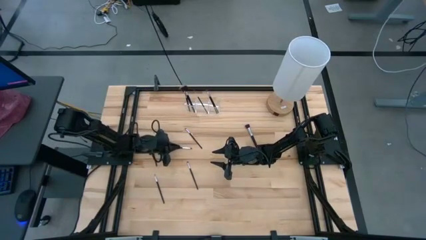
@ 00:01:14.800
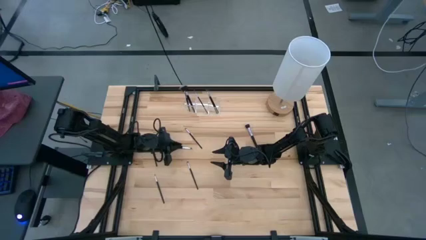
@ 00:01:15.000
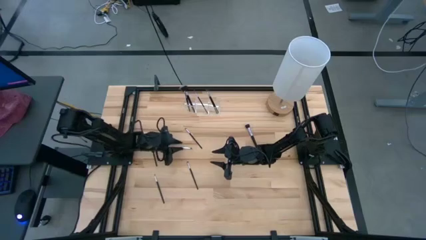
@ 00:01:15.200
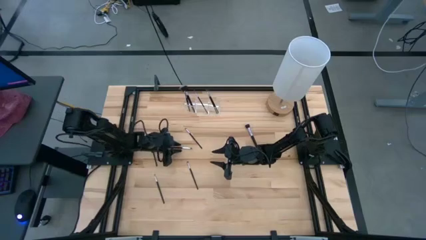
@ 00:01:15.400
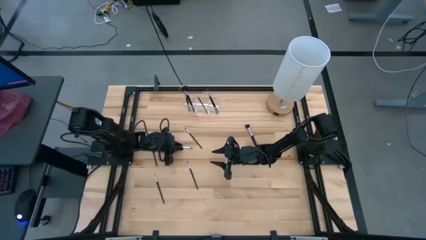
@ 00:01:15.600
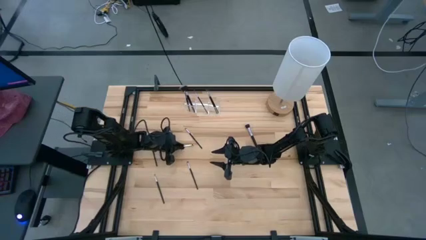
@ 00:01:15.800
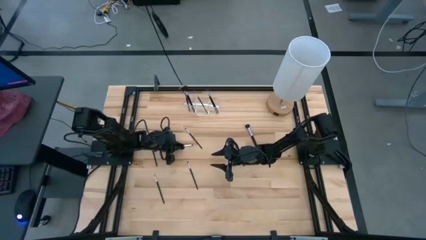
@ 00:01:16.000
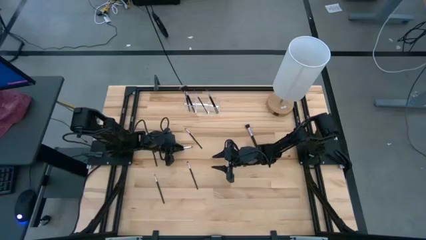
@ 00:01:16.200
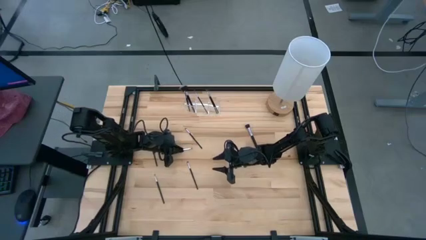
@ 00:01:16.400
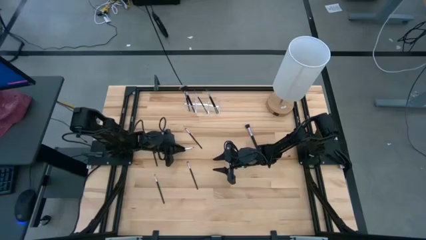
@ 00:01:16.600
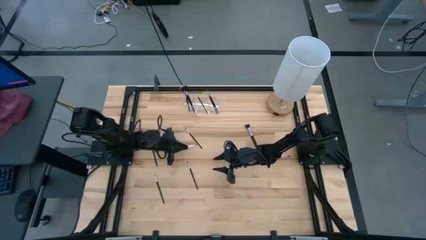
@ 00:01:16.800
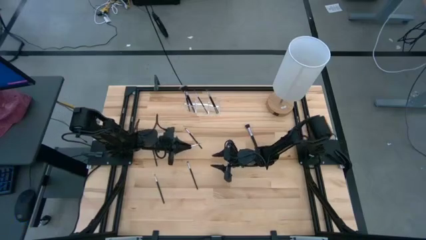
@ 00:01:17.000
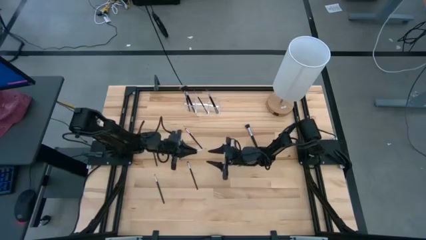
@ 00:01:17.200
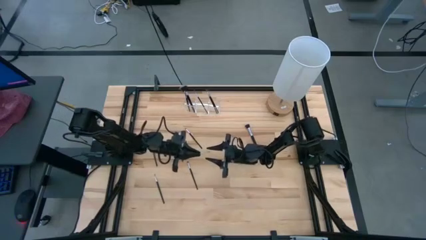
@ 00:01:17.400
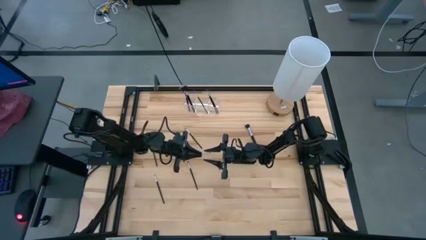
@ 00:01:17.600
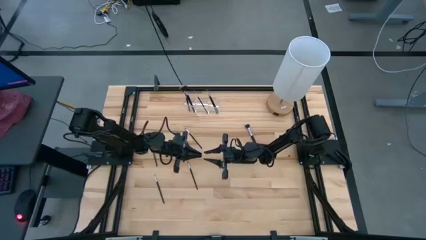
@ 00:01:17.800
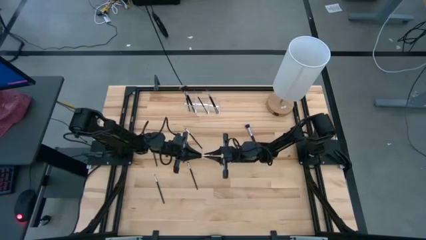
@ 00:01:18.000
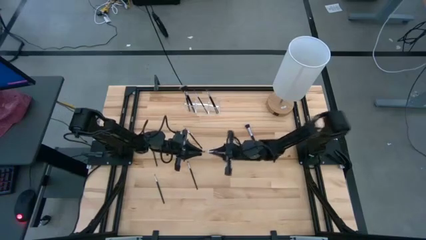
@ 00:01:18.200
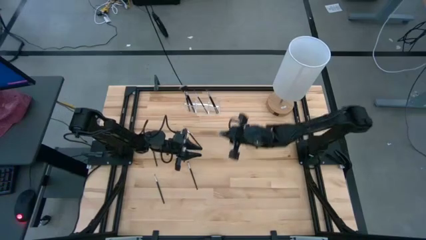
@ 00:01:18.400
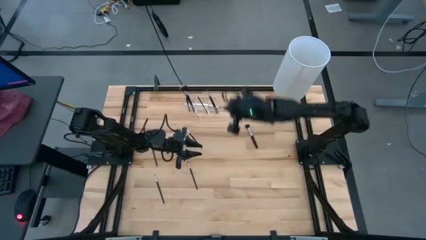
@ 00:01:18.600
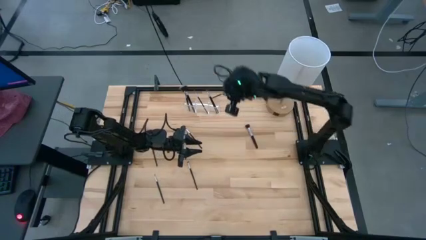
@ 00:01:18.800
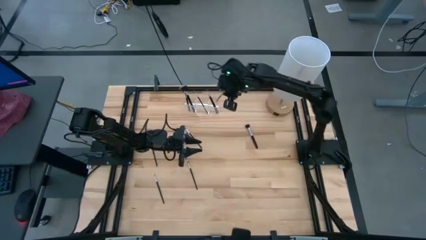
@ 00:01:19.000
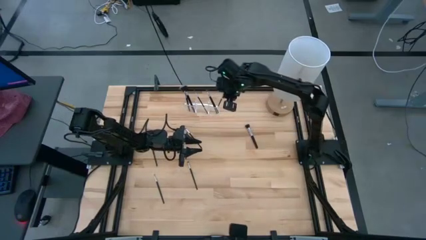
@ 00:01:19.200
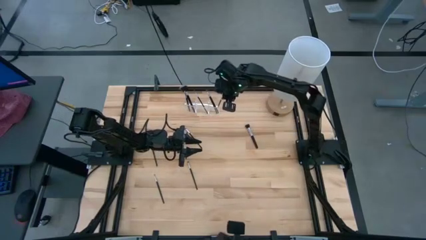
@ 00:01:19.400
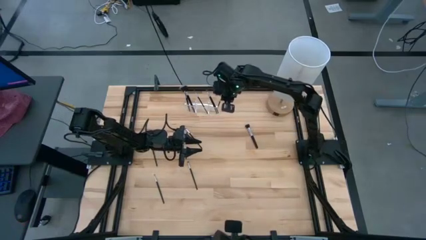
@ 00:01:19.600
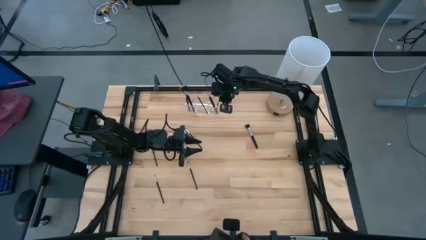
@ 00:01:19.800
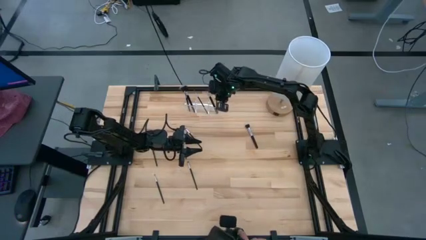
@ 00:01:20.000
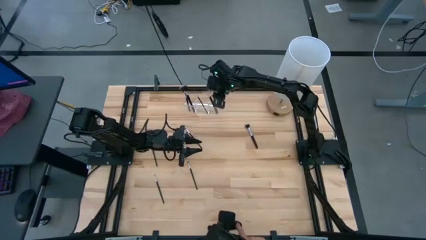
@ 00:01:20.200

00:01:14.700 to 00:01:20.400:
Task: Put items in baskets/containers
Put the black eyeshadow brush into the transparent organizer

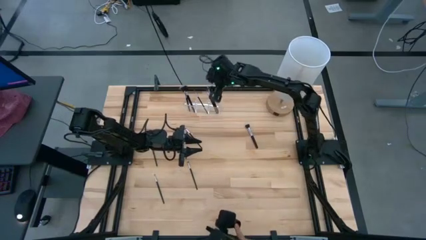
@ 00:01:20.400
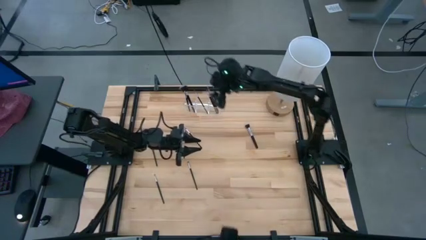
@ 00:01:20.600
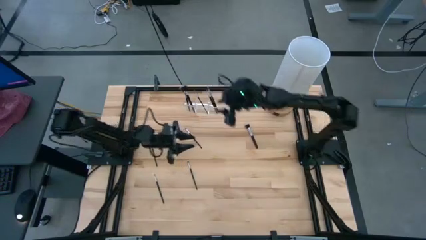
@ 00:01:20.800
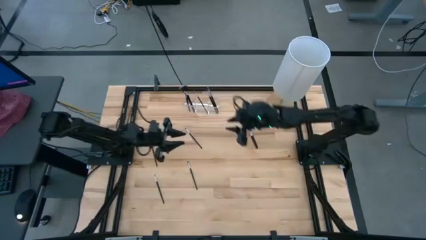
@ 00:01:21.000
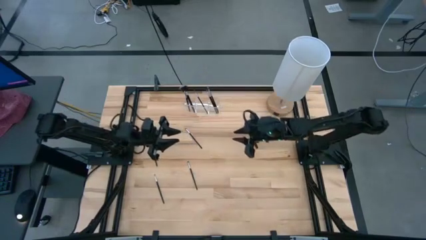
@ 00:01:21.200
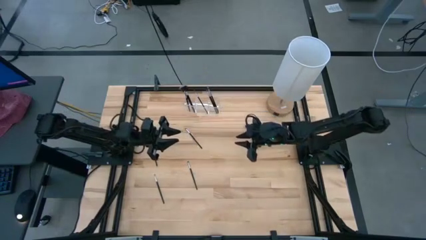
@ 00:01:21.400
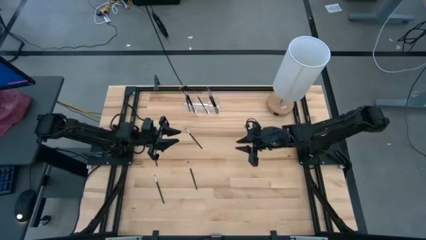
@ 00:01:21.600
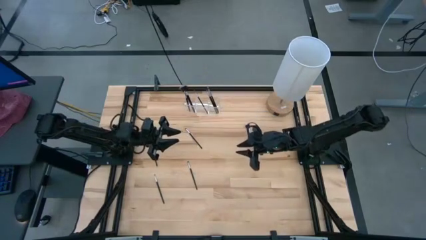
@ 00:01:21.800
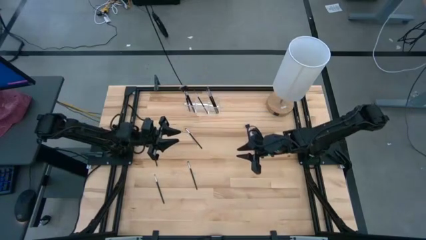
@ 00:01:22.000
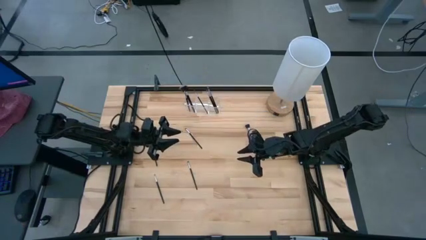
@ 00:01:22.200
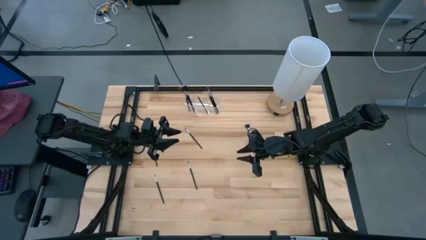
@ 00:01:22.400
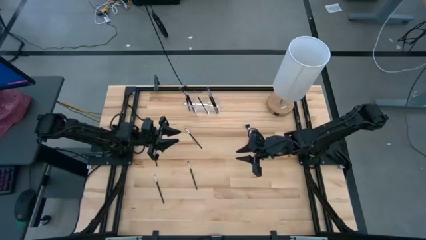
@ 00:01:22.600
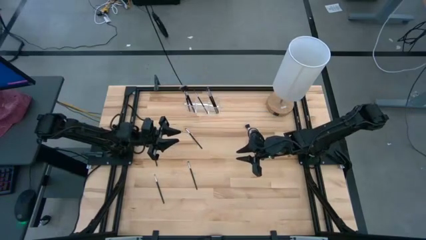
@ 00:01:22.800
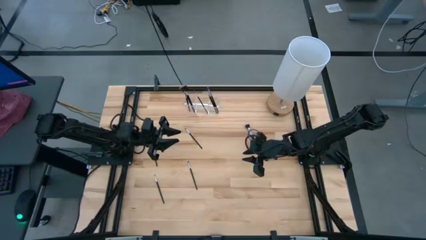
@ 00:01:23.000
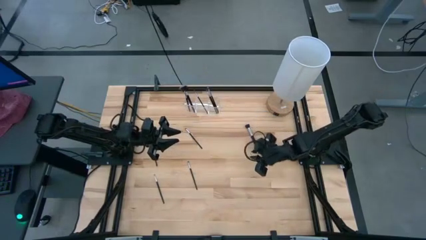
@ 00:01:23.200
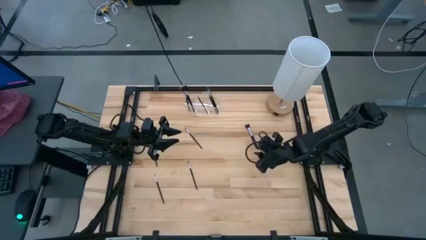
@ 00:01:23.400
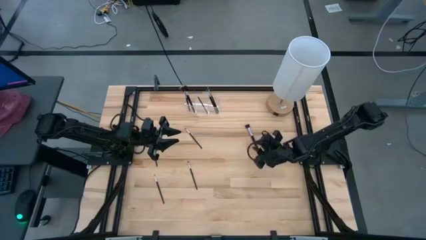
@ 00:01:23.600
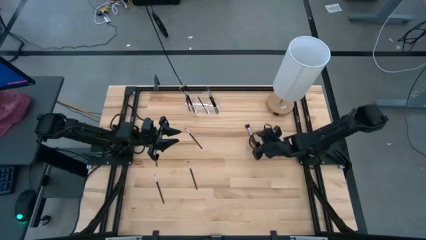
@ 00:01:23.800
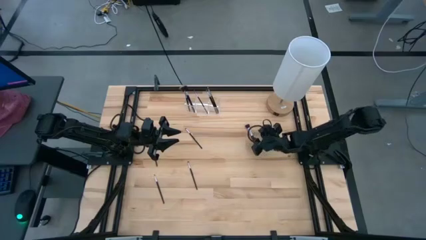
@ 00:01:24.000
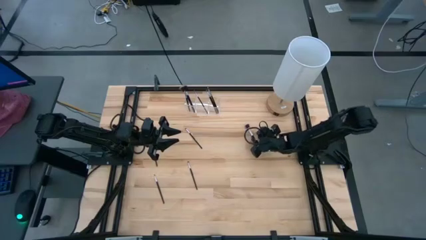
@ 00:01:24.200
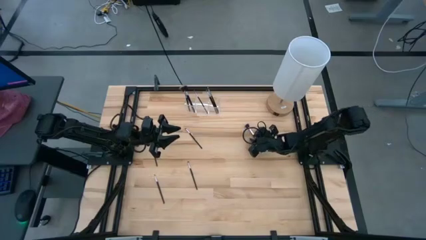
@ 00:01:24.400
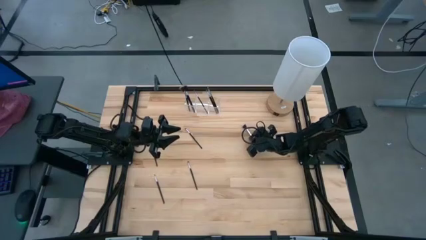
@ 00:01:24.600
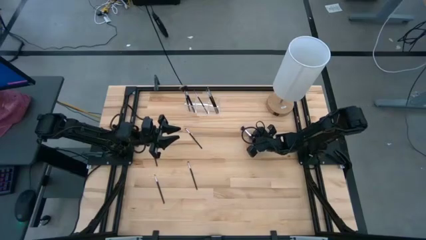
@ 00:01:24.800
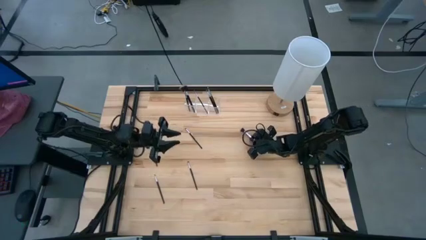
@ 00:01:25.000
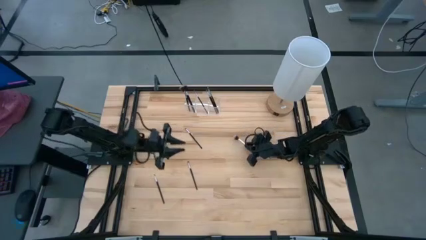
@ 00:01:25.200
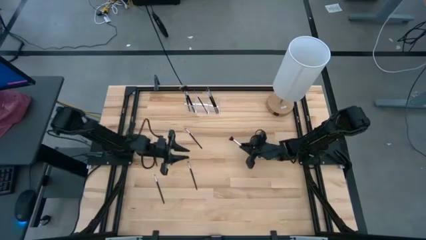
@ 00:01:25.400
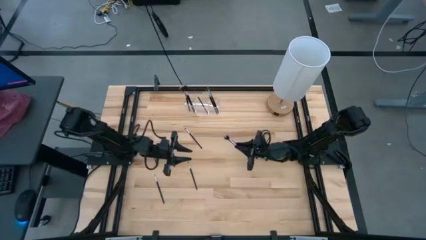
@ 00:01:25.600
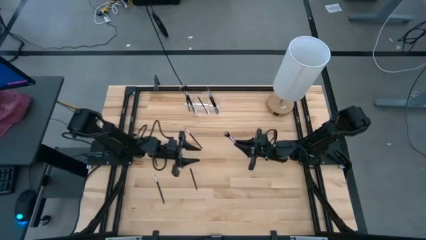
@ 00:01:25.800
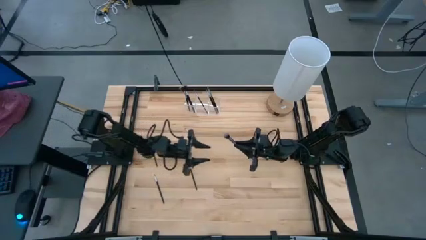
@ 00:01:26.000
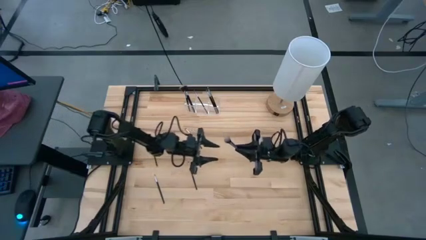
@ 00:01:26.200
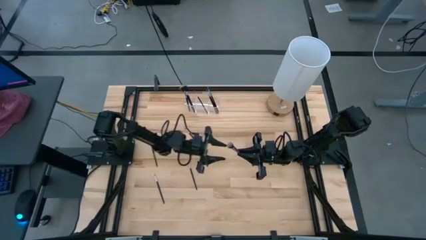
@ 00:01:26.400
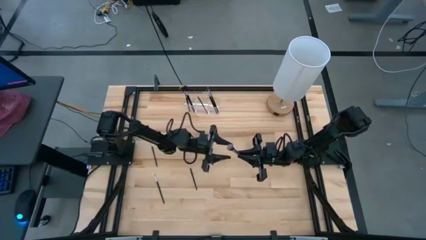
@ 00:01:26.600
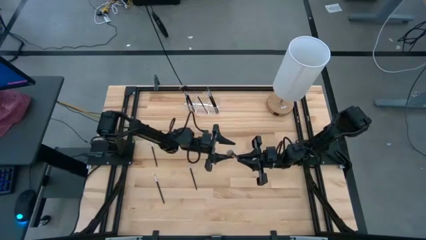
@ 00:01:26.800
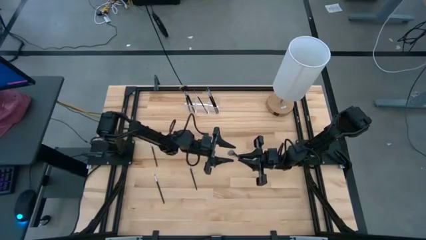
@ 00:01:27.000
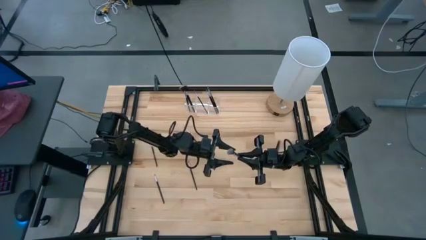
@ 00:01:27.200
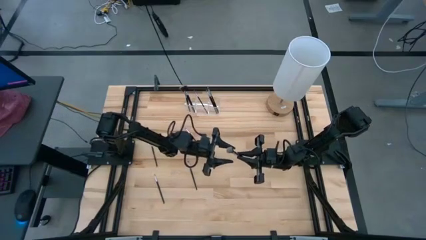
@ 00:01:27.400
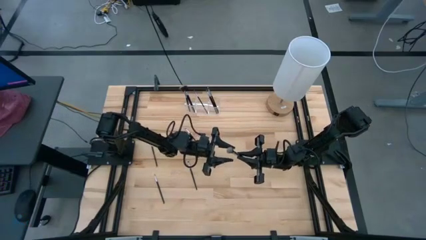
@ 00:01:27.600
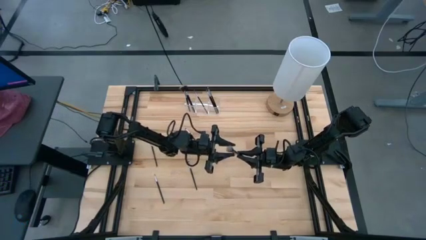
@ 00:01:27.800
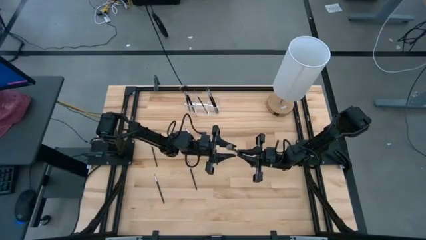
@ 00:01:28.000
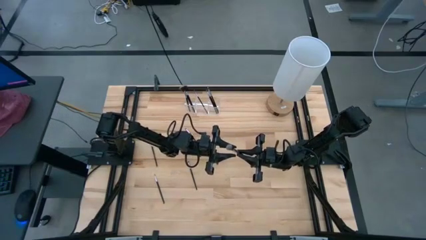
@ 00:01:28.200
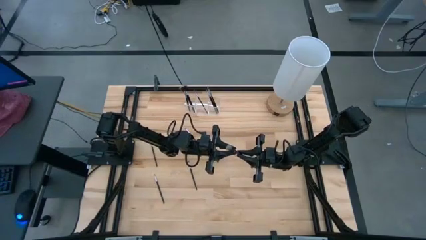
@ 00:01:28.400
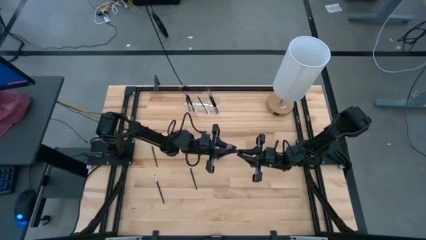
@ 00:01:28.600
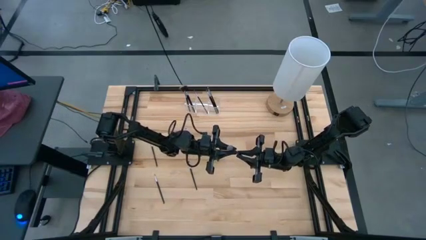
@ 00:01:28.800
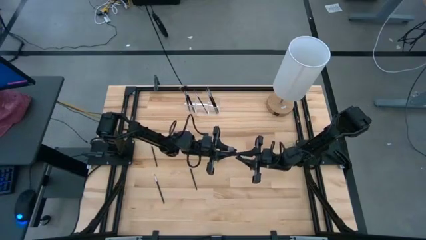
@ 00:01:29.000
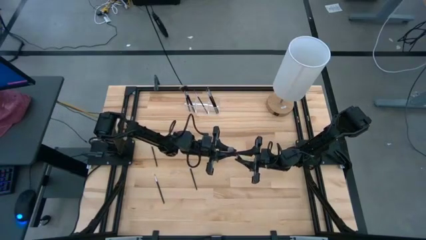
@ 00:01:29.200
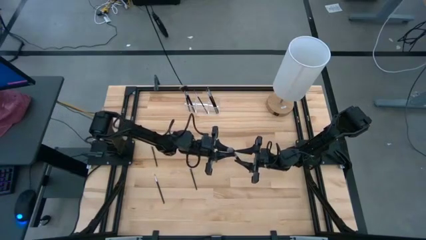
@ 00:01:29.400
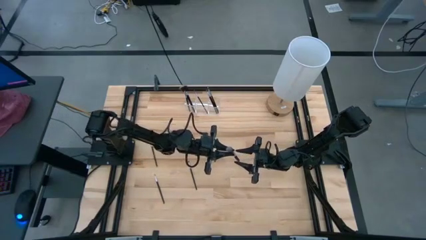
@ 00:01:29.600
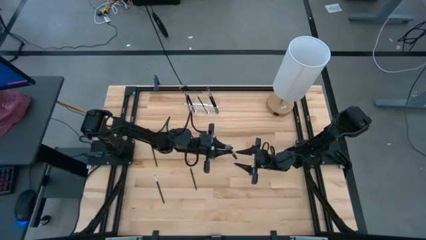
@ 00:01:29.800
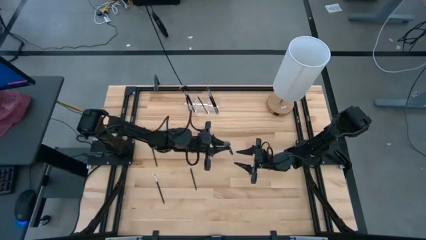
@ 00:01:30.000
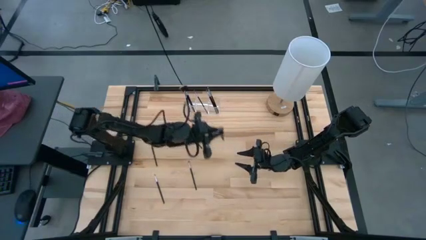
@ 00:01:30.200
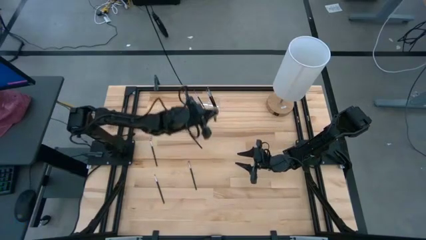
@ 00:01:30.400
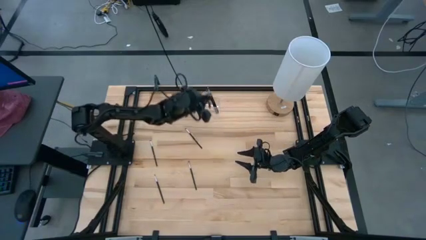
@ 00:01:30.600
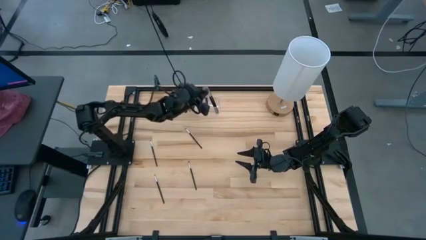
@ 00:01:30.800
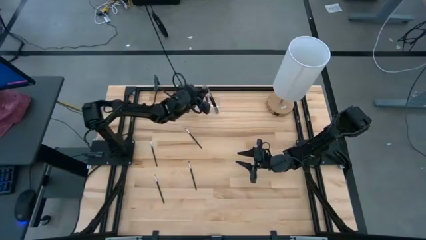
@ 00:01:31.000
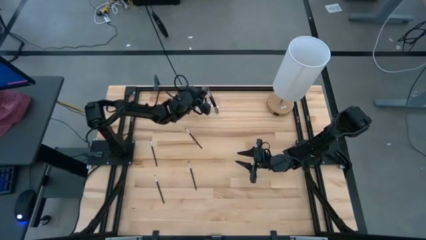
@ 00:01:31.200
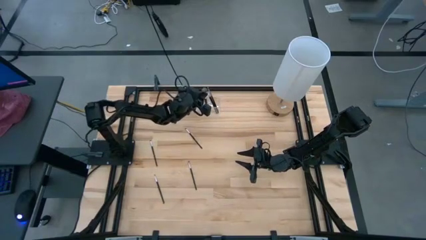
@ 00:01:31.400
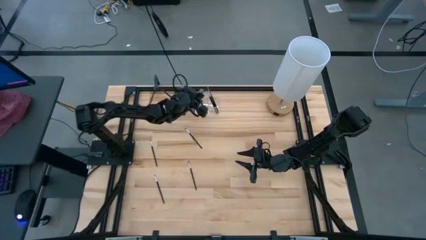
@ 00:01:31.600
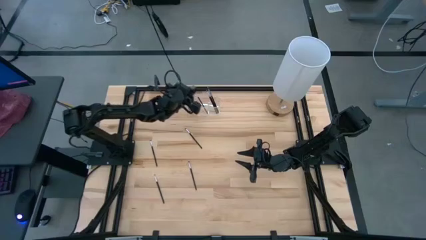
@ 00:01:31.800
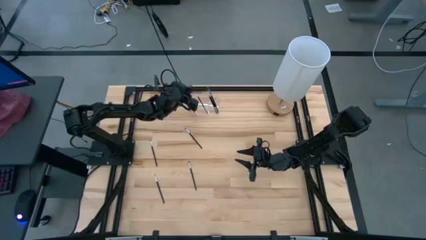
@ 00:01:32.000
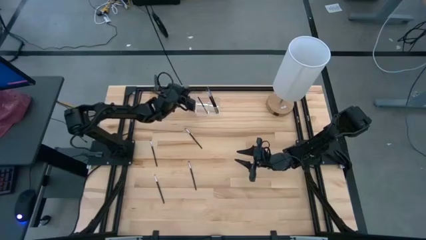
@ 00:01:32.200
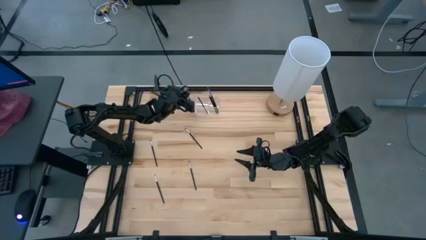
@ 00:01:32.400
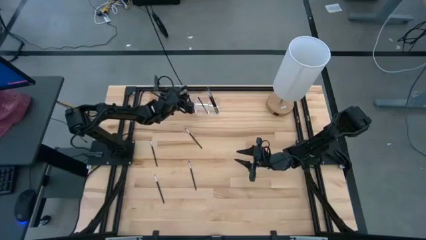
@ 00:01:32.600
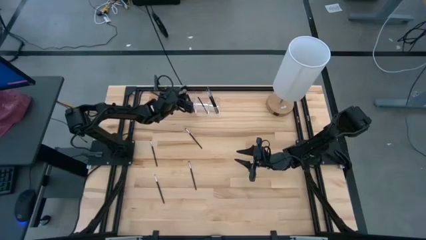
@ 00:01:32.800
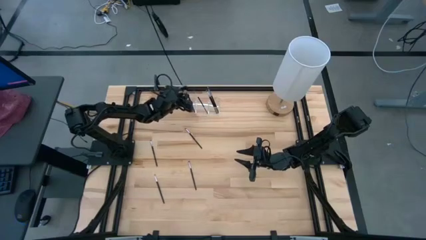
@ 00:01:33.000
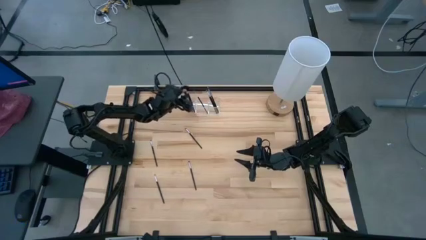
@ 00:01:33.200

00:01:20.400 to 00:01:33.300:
Put the black powder brush into the transparent organizer
